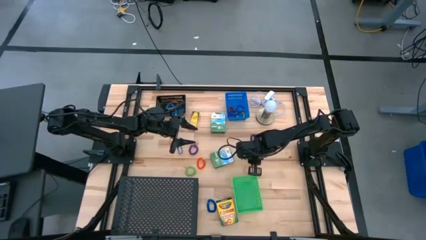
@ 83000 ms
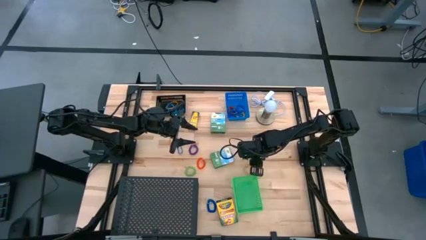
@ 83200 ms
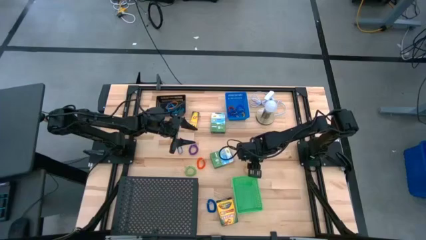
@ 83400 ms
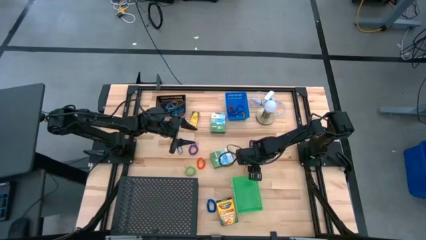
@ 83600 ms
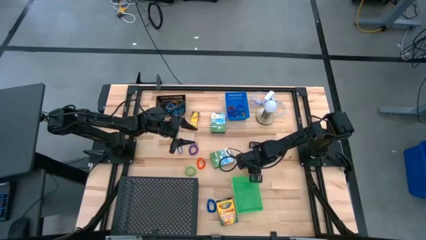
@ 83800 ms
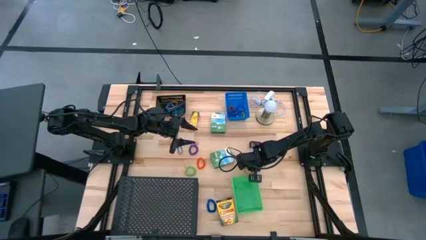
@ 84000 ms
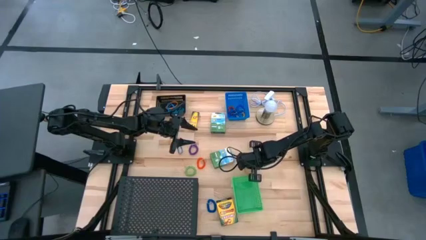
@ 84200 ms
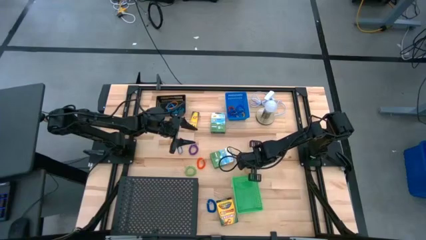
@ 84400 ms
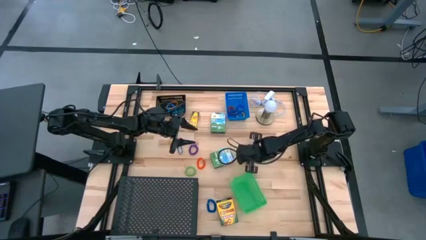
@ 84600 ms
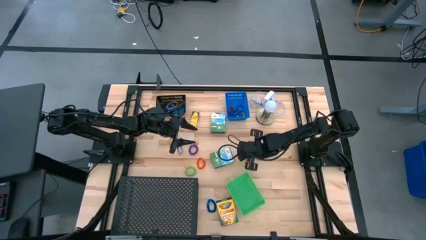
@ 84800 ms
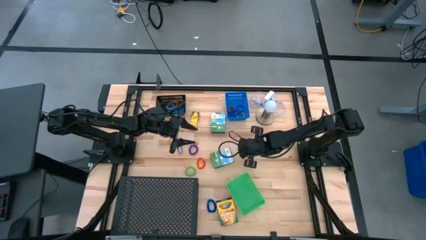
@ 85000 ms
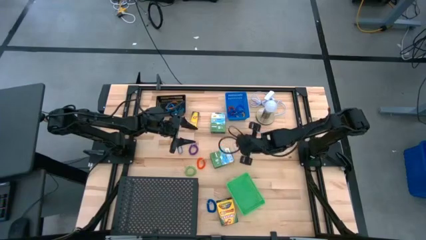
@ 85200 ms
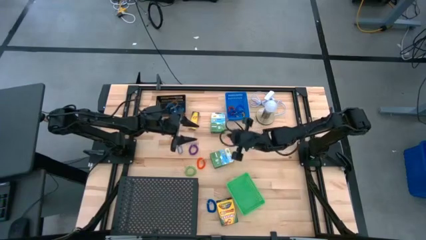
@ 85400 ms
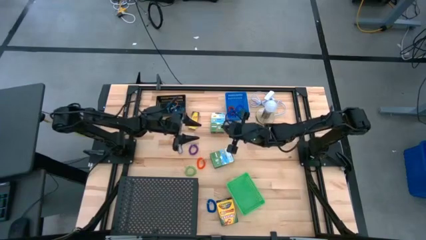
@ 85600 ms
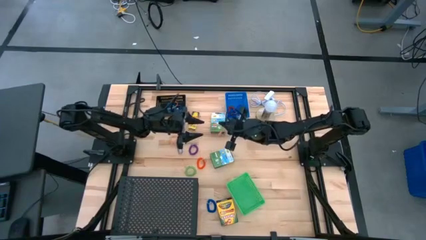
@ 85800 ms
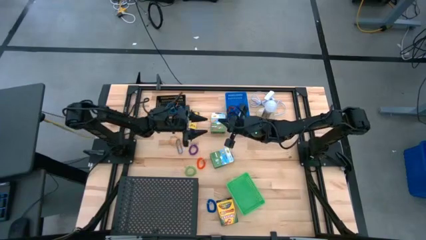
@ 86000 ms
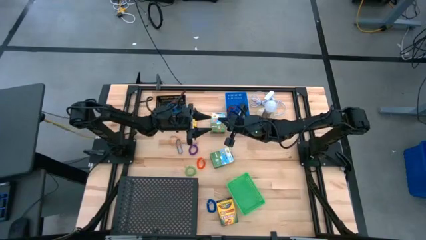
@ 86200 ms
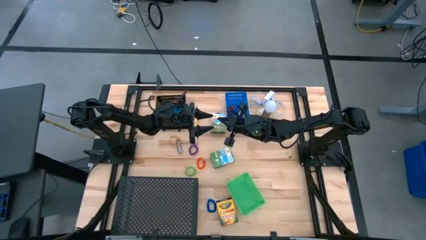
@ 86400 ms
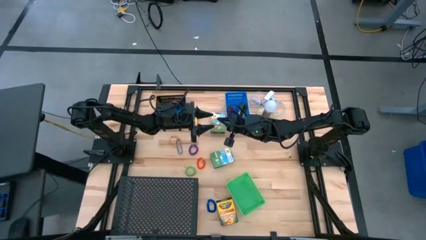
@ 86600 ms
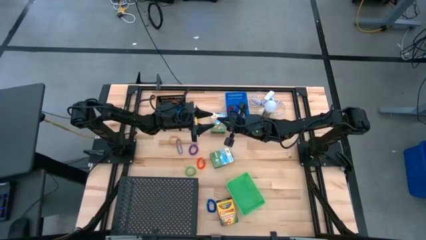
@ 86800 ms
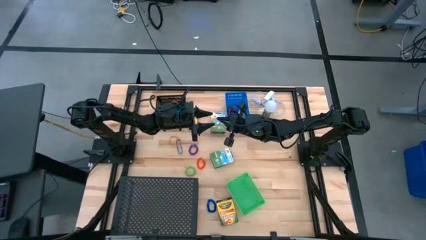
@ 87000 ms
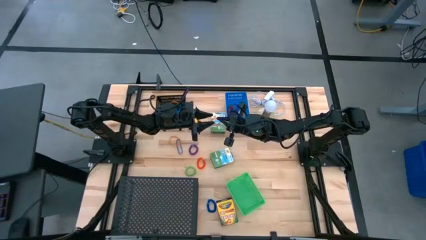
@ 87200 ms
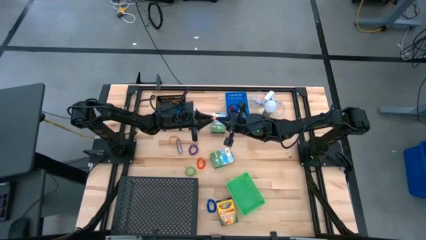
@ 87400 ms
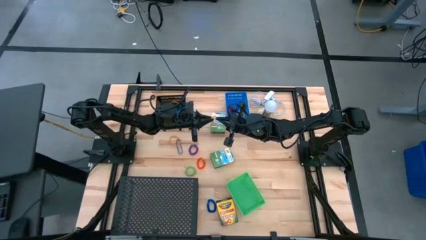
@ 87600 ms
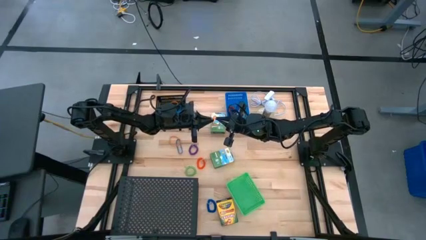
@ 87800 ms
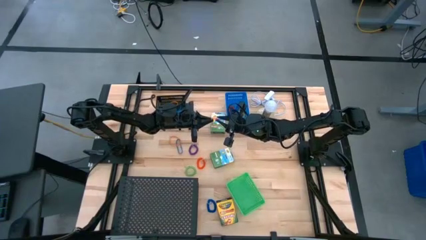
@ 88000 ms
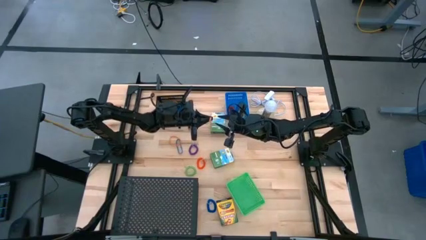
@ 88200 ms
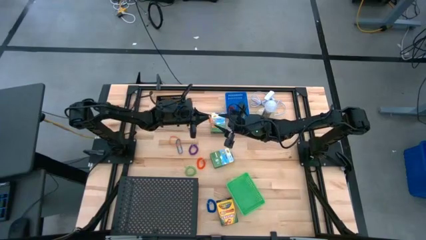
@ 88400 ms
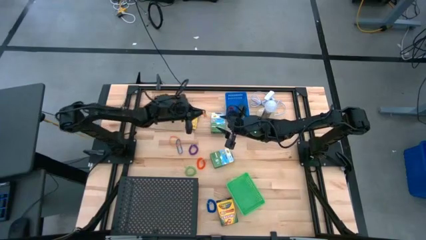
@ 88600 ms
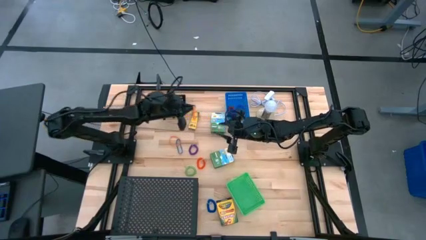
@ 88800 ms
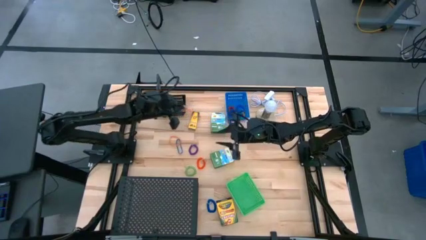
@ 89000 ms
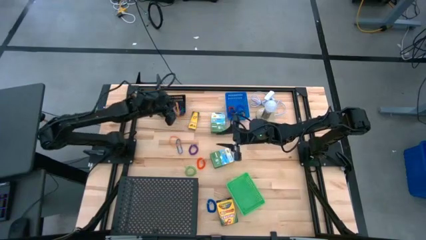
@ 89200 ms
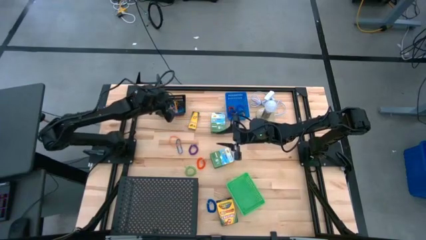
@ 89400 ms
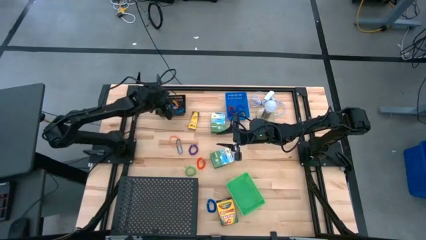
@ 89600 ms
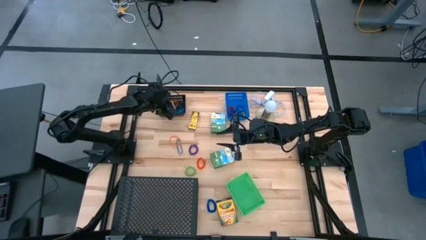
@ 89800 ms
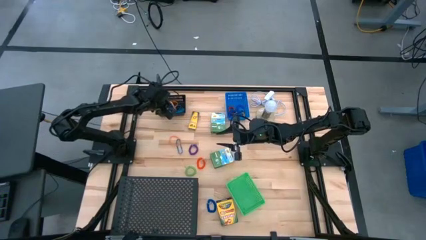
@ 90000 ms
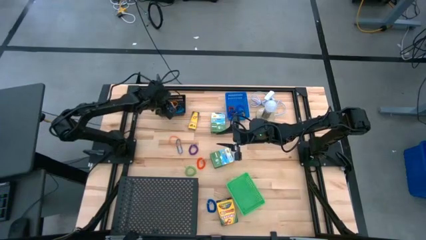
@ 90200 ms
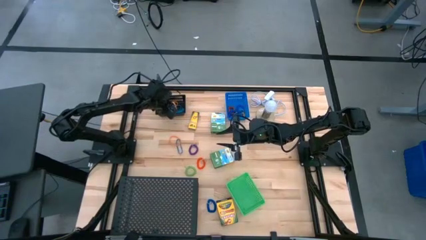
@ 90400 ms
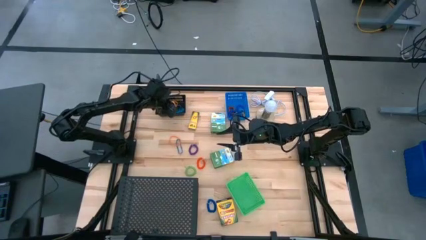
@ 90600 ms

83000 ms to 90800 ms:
Task: Pick & Place Office Desk Supplies
Put the right orange rubber band into the black bin

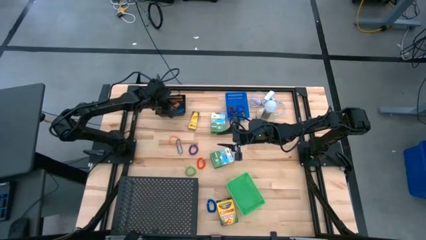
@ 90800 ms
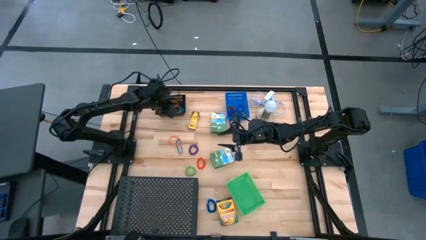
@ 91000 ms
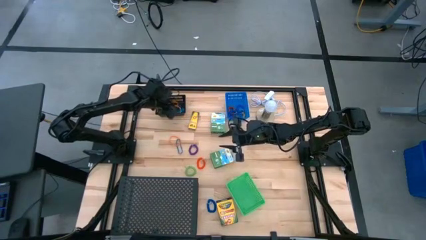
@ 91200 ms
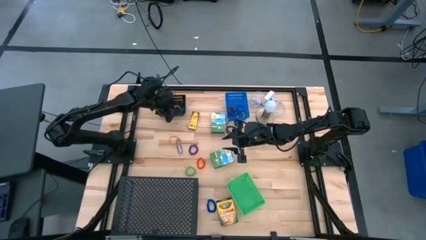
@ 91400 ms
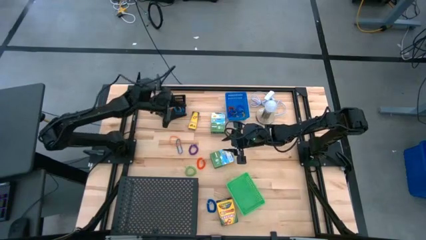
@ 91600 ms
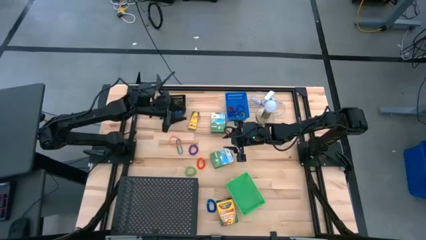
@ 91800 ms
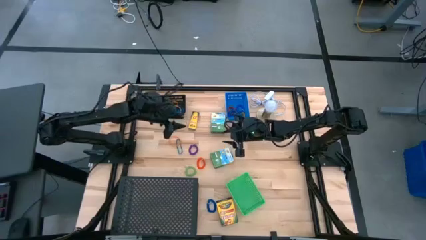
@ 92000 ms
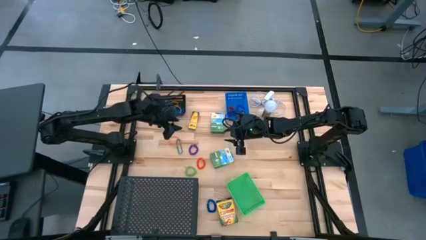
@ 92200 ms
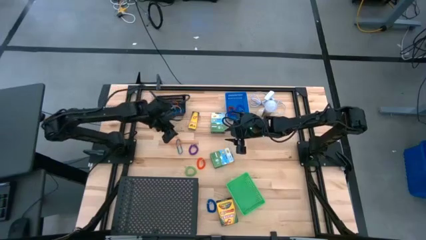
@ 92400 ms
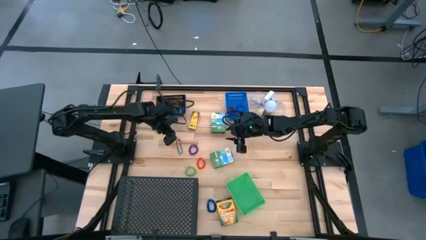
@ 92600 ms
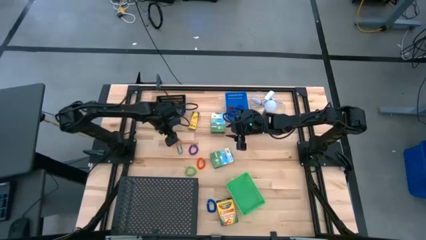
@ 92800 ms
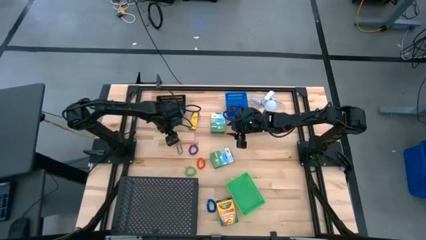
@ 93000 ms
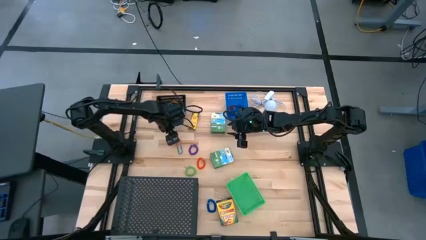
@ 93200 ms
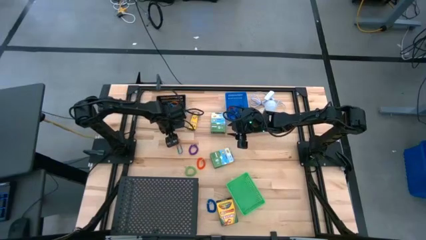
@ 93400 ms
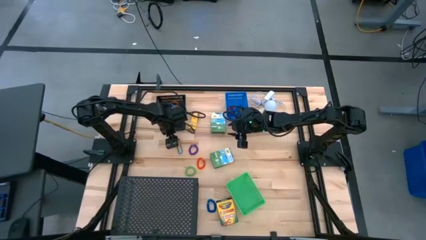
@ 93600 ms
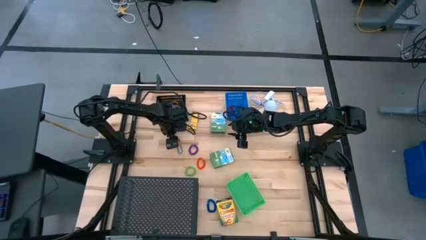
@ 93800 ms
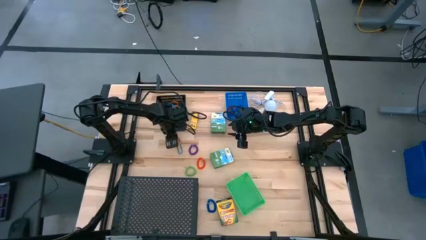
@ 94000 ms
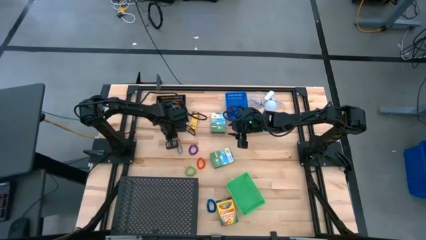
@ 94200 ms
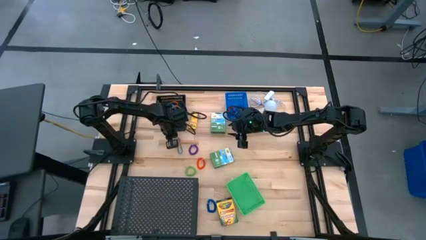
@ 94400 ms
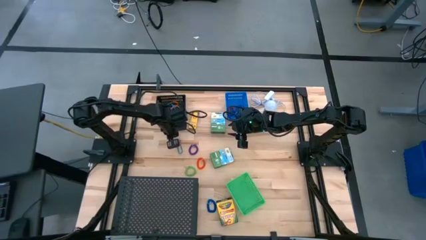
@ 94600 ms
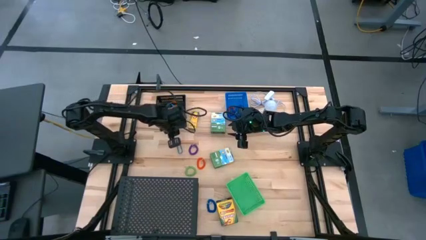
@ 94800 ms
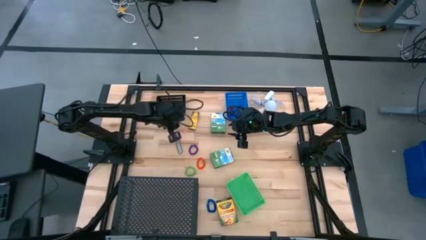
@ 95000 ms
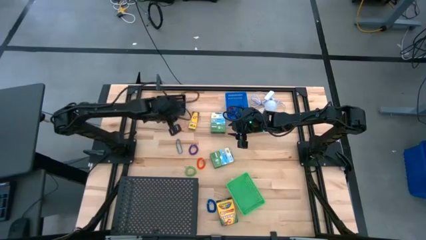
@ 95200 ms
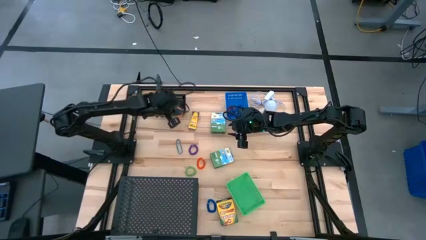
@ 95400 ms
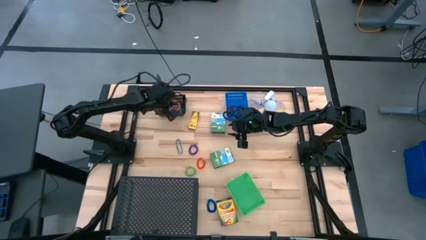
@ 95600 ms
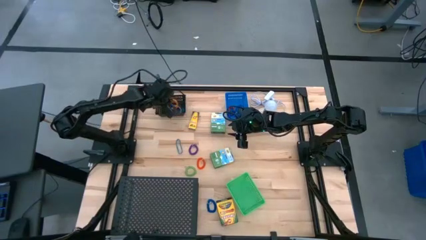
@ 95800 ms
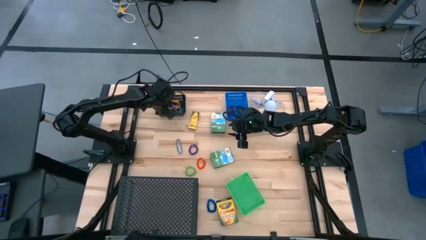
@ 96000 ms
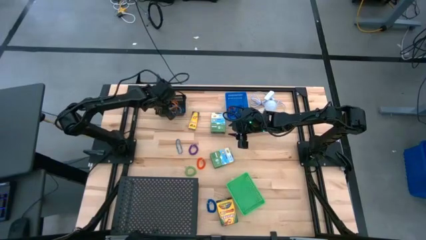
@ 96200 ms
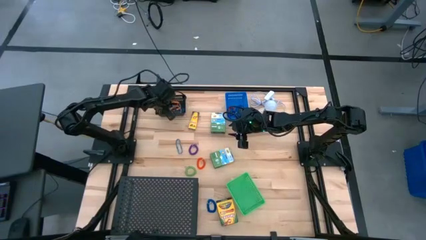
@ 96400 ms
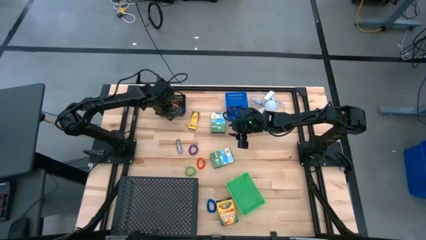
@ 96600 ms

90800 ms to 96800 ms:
Put the orange rubber band into the black bin

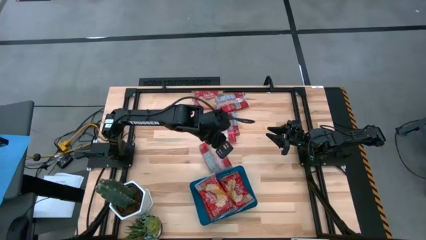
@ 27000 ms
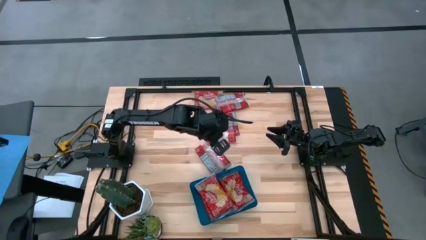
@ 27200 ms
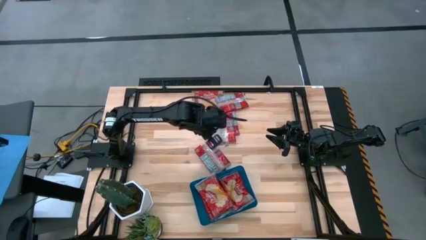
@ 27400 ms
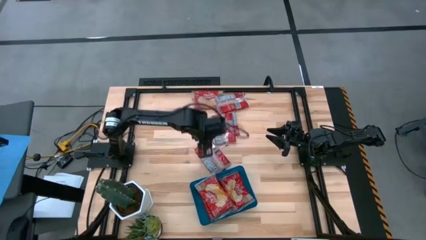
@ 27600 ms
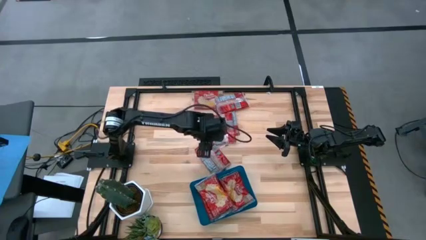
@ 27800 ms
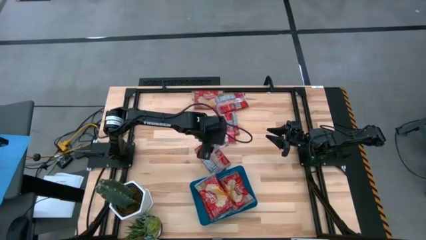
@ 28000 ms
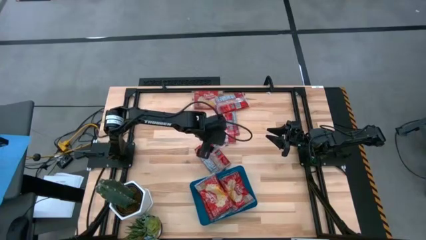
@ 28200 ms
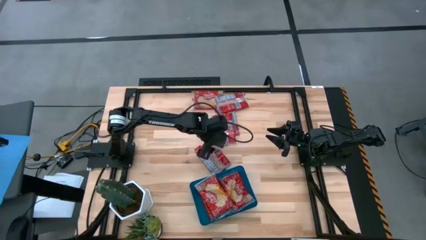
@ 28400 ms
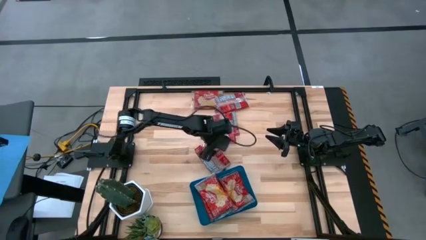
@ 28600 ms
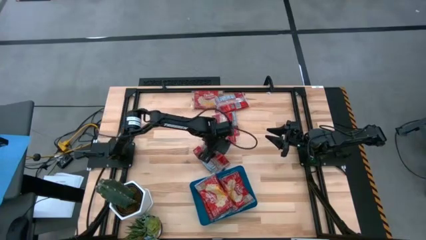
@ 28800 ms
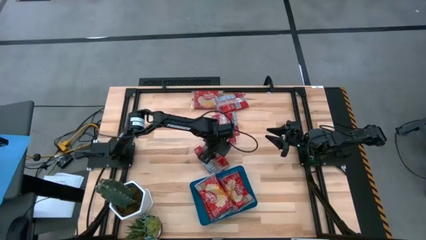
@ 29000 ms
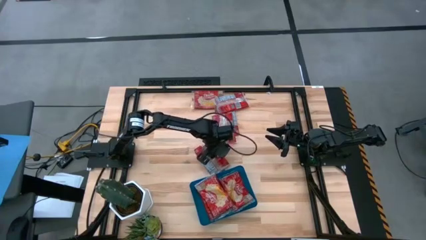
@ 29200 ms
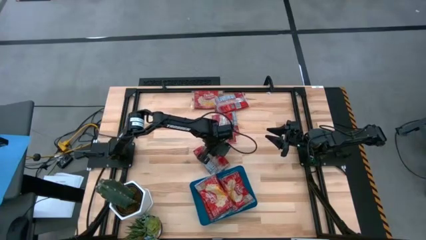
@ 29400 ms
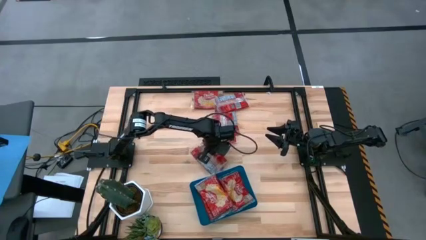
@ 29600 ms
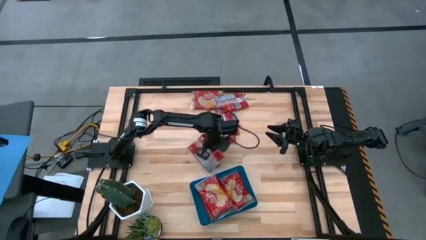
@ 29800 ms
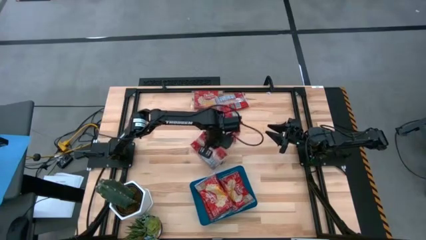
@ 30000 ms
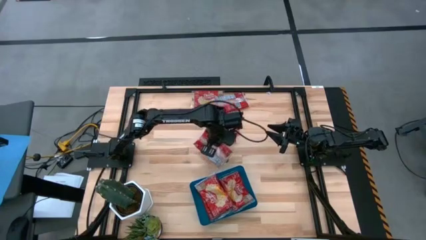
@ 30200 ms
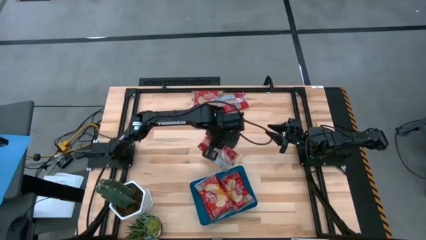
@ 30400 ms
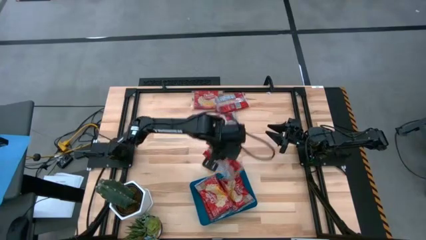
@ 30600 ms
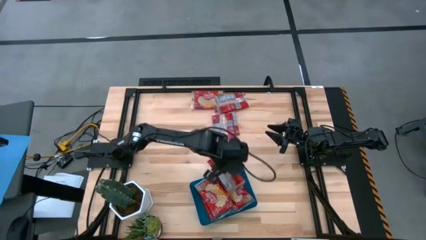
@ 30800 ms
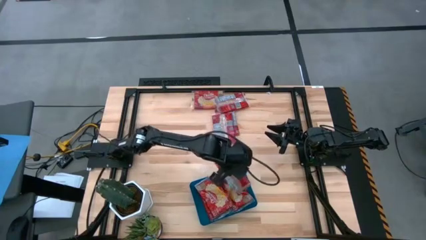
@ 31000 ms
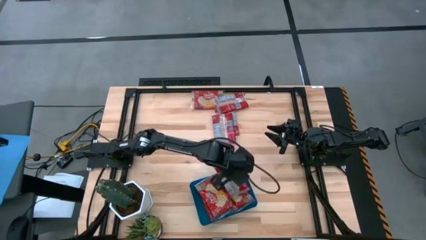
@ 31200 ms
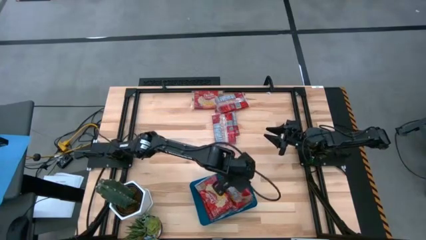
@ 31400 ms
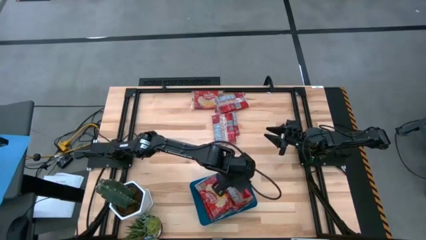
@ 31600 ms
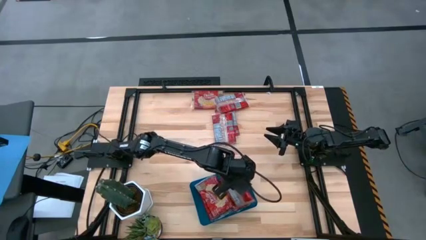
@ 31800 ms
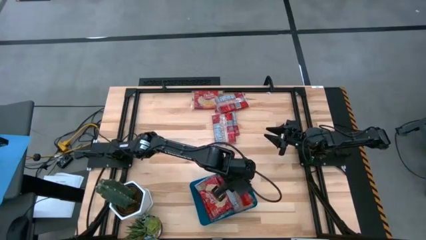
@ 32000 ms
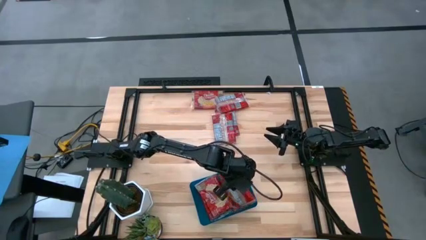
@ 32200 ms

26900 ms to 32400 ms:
Task: Sort popcorn bags into baskets
Put the popcorn bag into the blue bin
